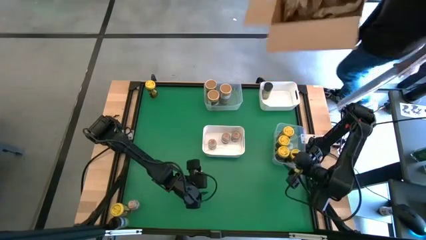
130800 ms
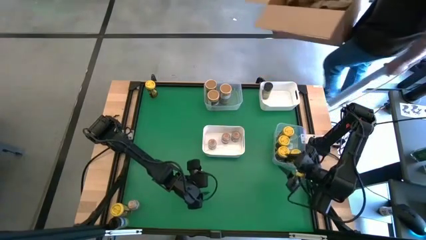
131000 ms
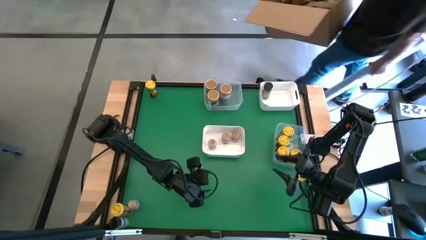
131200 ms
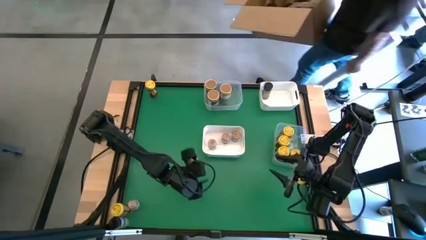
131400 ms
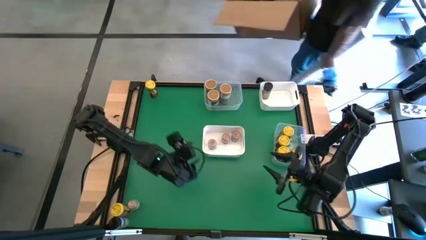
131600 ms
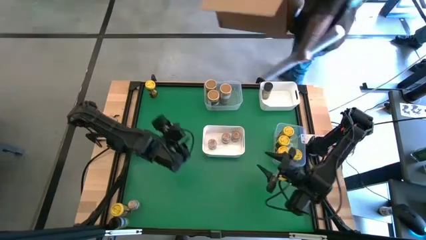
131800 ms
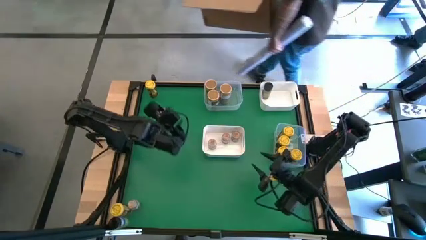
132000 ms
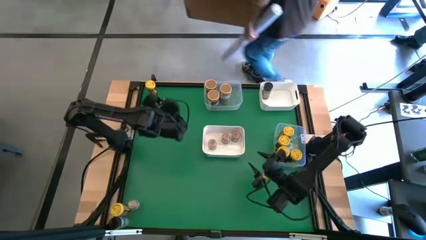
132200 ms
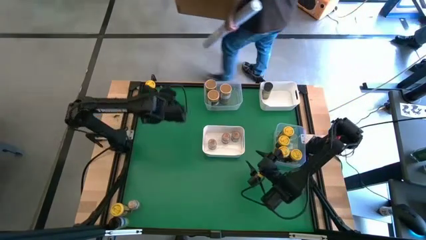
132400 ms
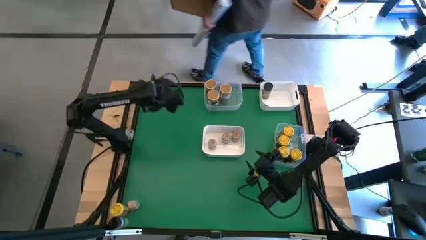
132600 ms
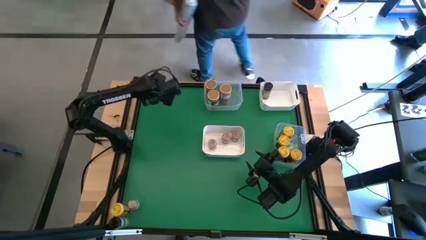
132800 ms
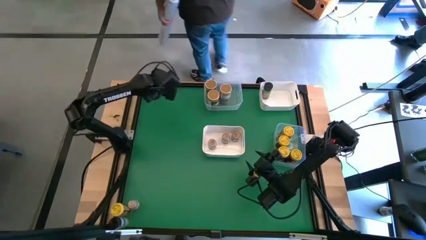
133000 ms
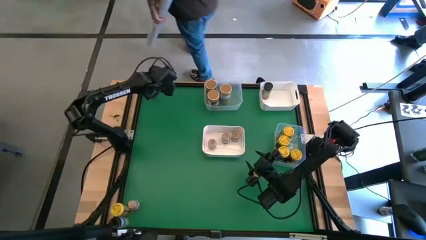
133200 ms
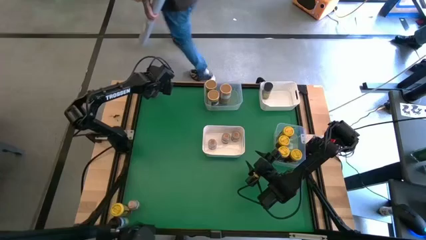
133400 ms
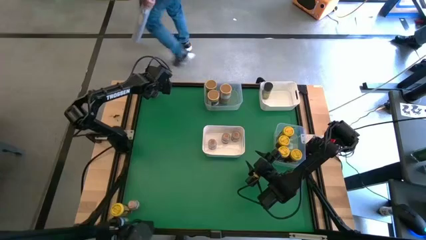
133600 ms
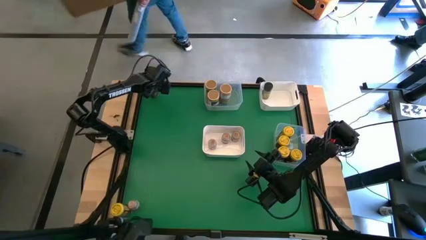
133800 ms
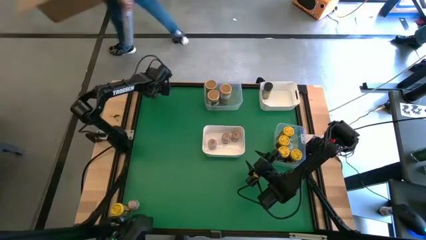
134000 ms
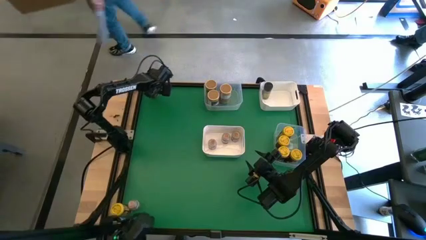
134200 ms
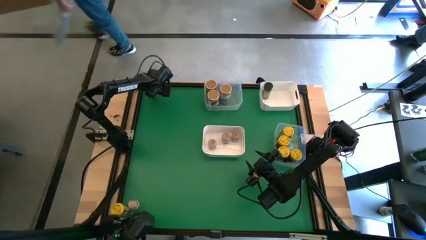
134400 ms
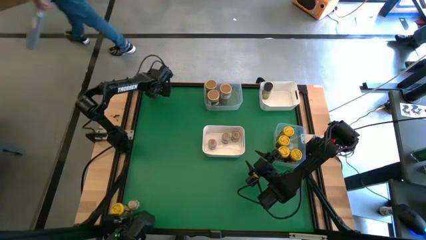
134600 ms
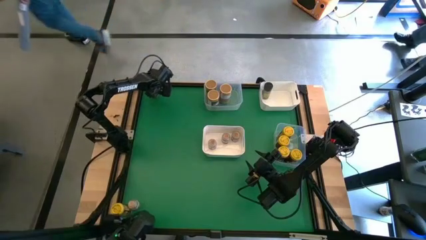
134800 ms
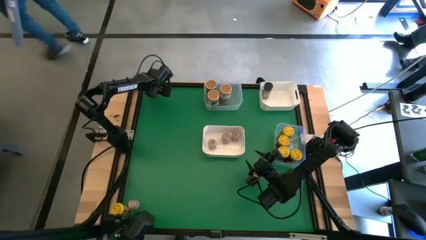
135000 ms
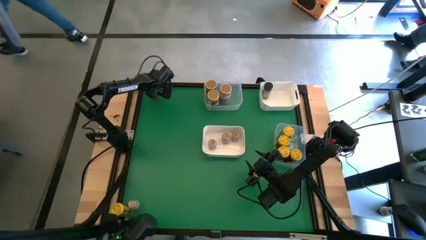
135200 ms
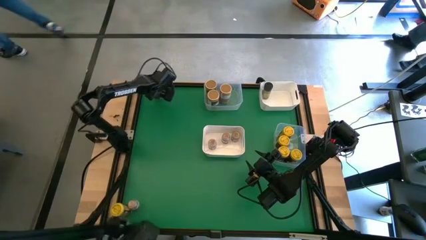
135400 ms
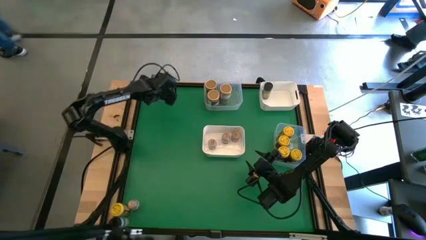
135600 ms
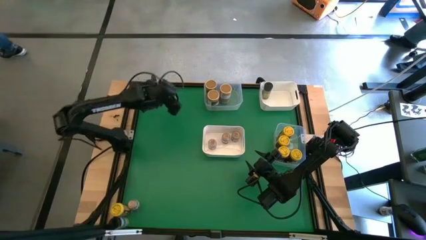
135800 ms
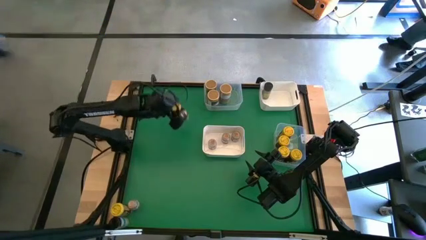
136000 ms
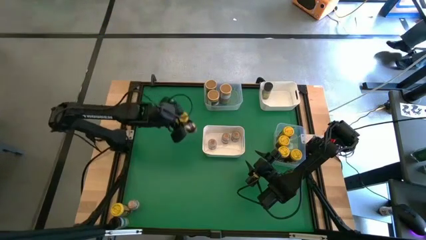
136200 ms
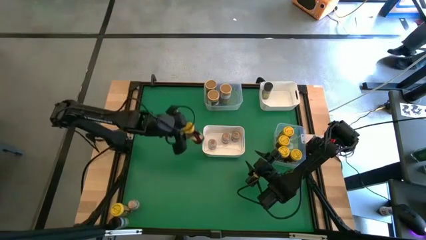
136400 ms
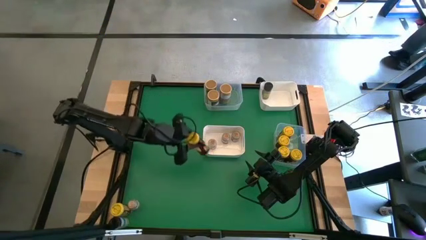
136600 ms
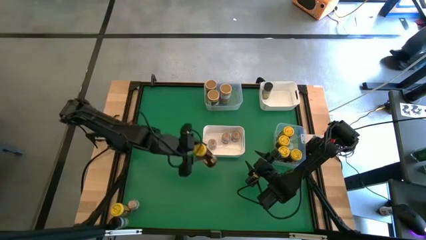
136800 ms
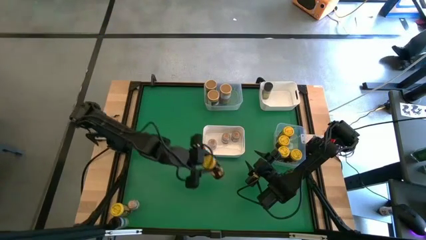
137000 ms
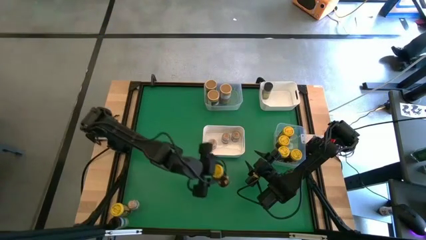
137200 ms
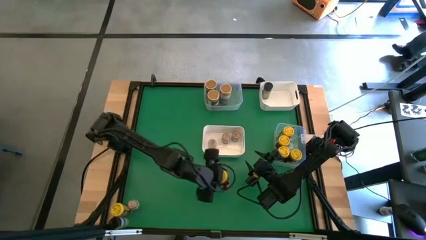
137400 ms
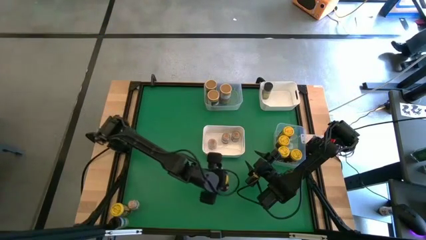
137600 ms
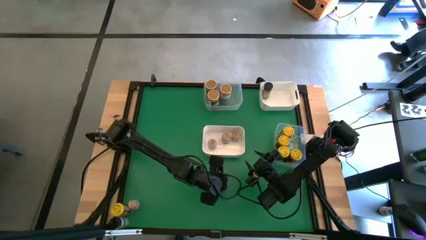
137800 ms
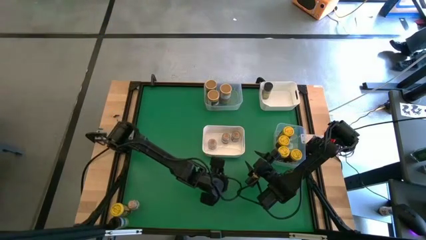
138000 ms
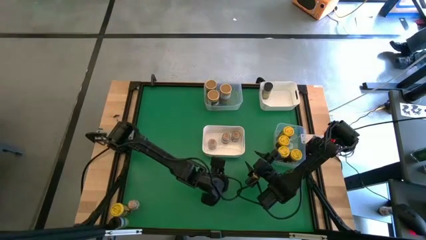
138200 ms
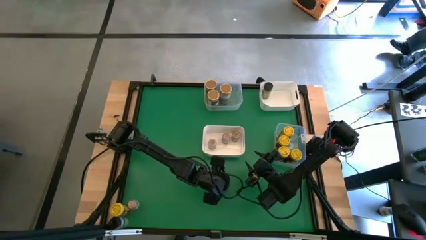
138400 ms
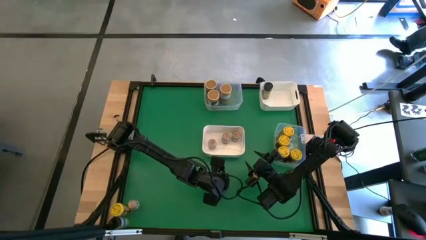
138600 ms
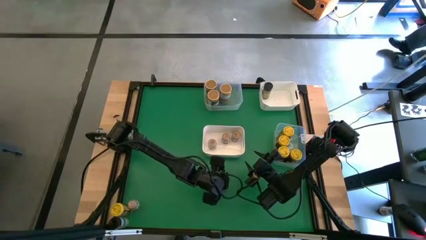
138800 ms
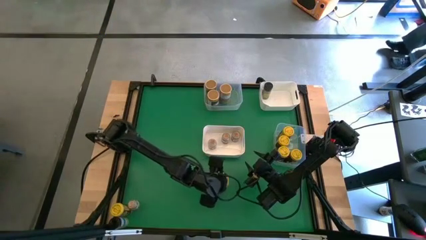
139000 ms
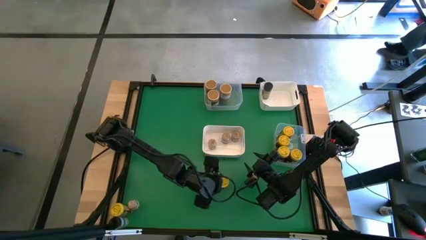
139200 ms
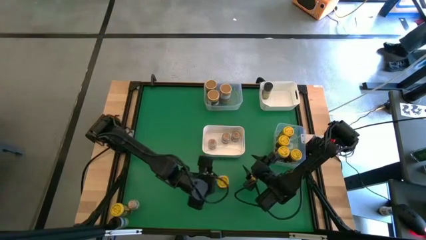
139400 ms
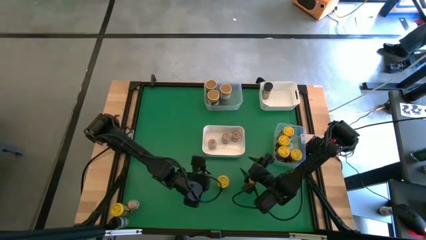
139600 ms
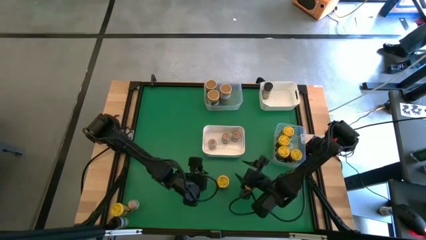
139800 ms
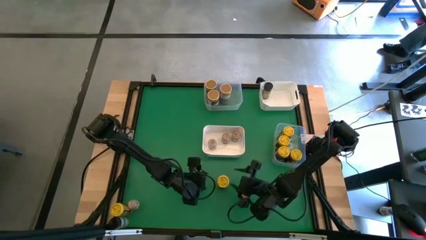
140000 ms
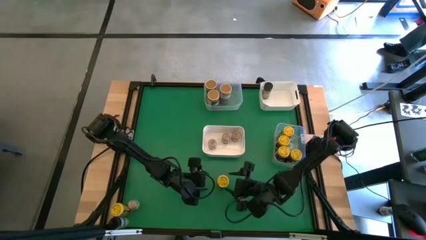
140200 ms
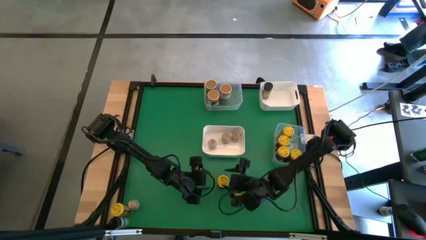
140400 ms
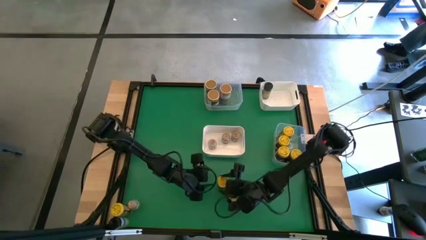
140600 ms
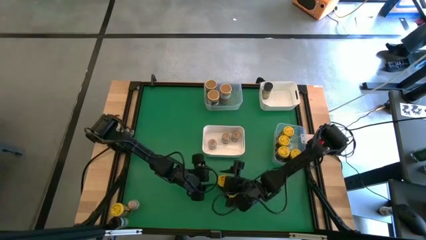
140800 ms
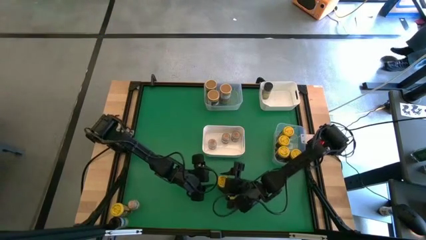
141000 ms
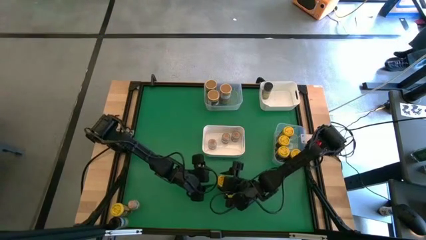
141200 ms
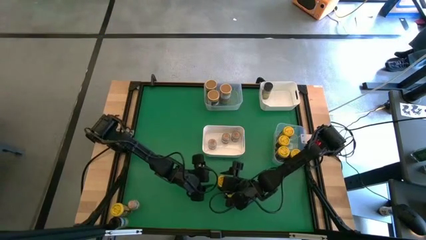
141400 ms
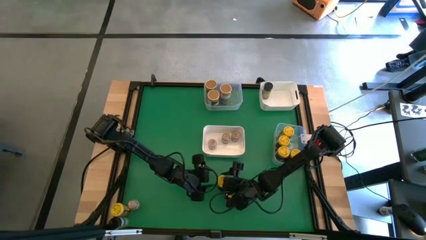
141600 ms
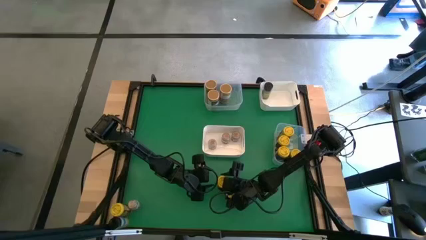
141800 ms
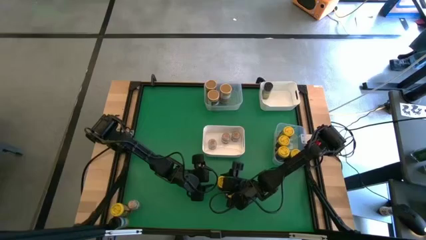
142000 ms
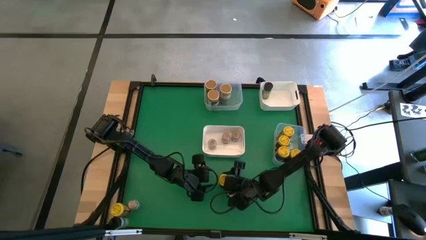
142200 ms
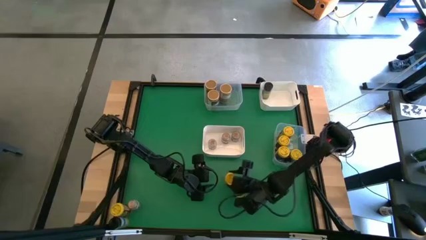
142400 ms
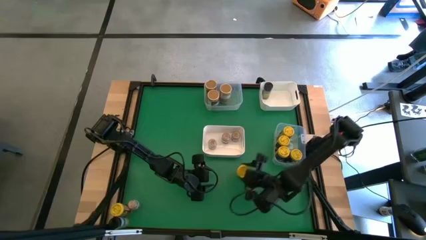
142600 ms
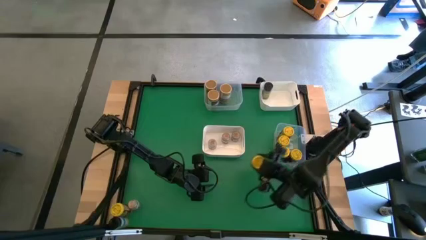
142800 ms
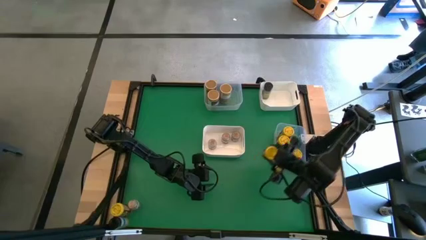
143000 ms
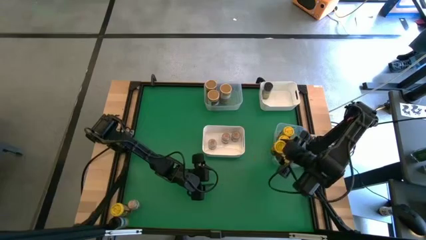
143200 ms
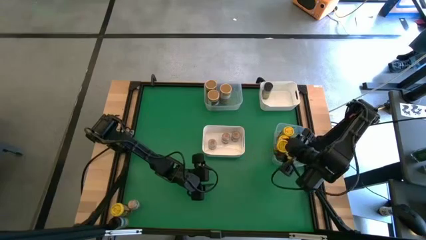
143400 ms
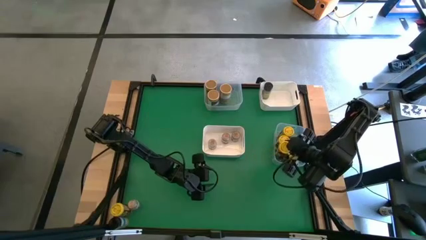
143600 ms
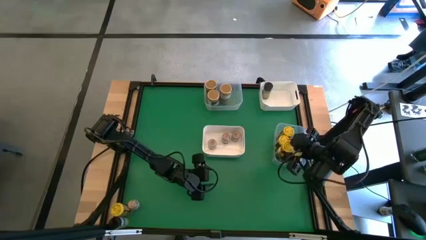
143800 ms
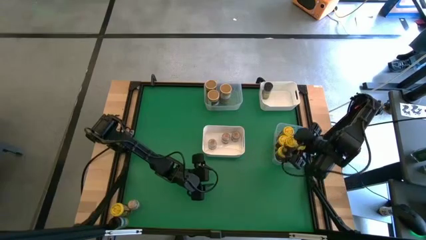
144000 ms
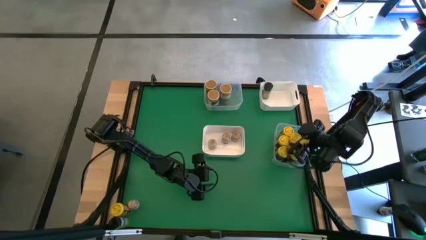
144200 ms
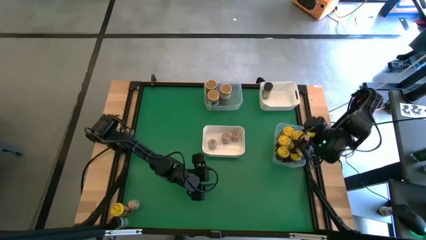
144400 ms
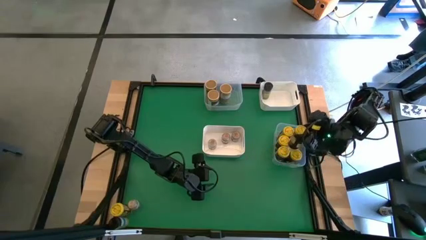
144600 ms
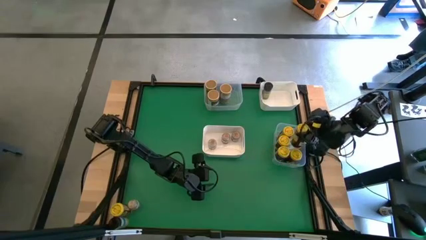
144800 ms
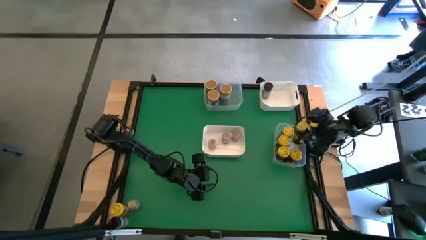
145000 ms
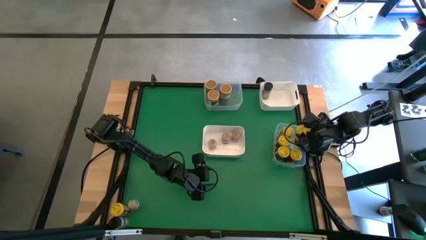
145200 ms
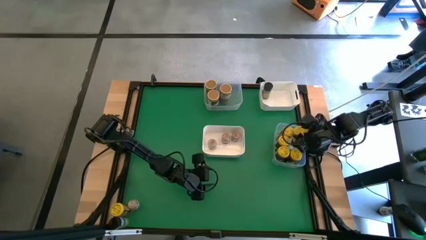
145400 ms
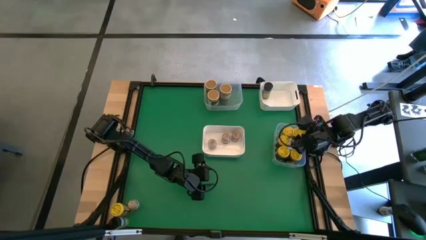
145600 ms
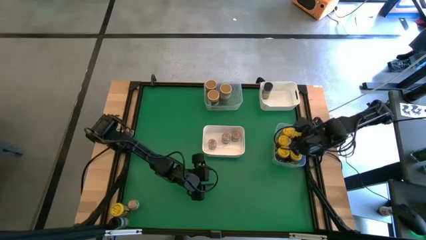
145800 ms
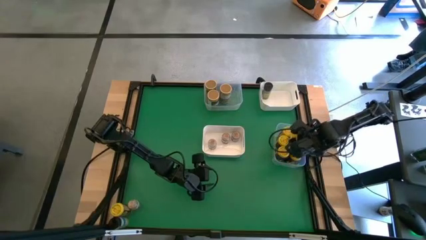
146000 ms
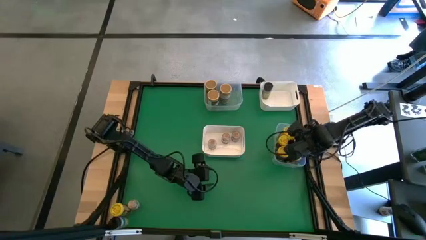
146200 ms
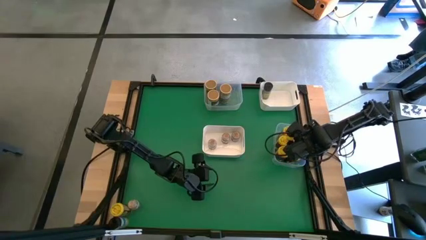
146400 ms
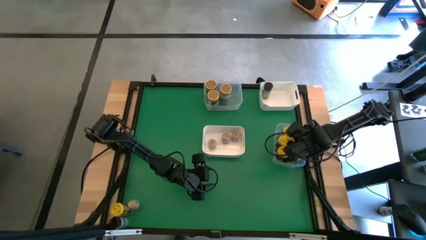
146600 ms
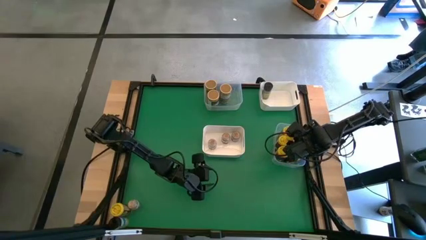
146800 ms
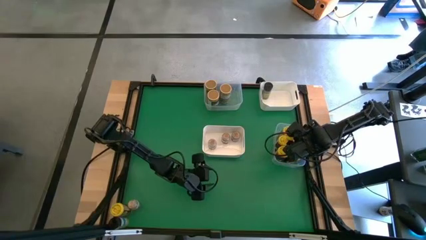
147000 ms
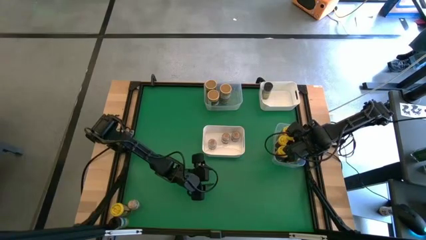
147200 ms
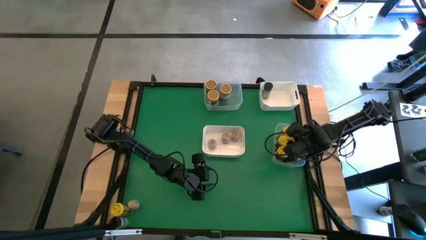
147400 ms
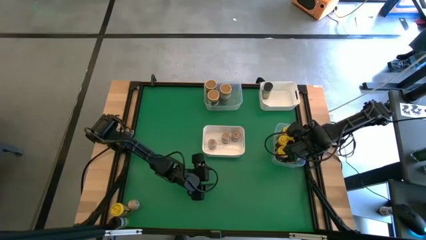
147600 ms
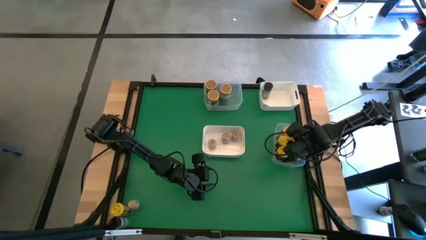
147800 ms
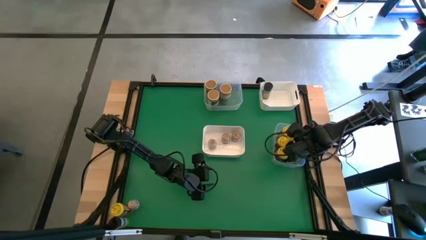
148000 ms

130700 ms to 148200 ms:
Task: Sort spices by type
Put the yellow seasoning can into the bottom transparent bin
